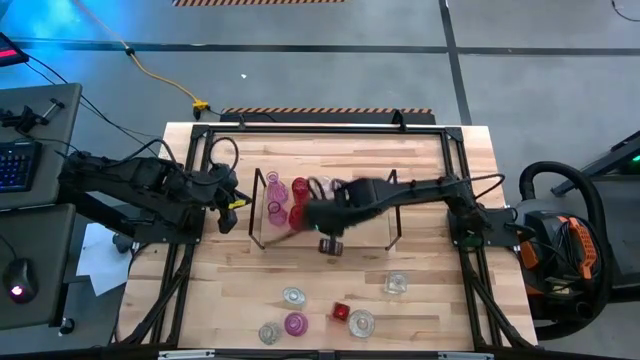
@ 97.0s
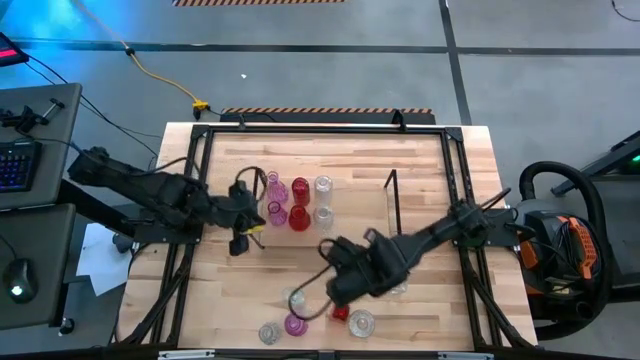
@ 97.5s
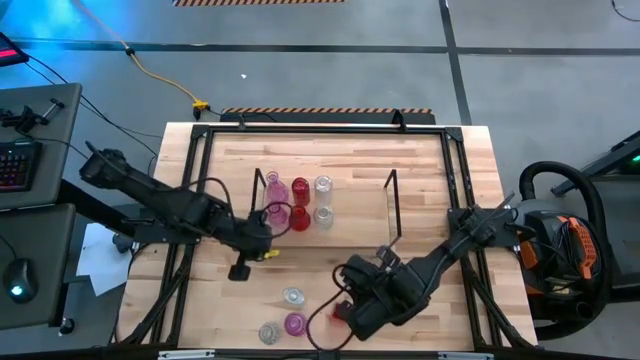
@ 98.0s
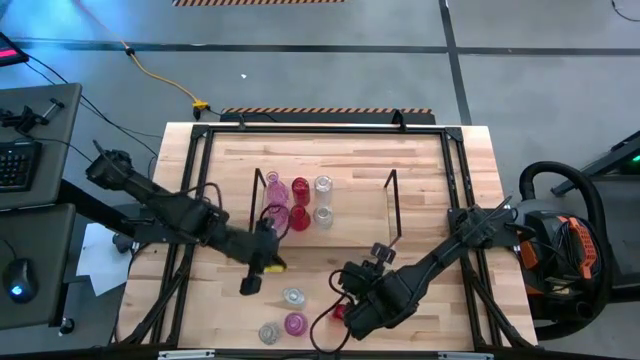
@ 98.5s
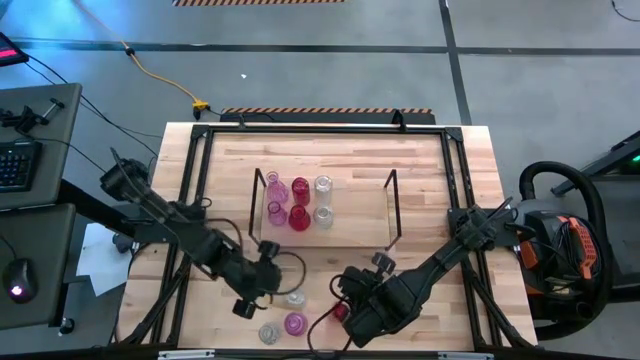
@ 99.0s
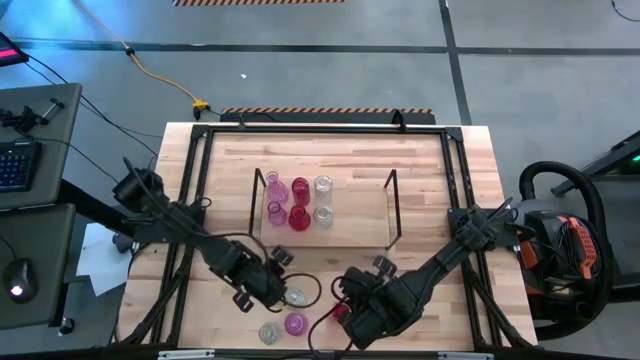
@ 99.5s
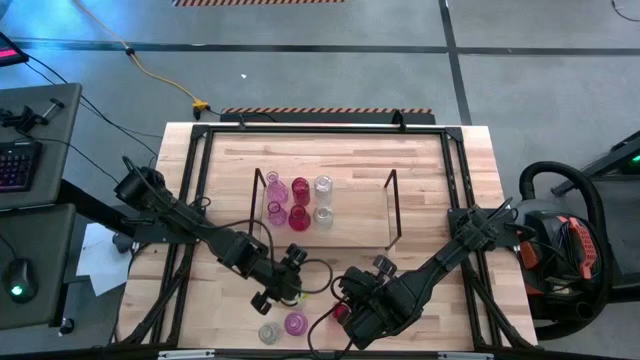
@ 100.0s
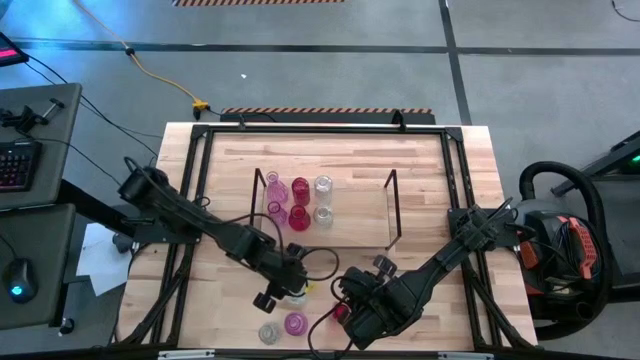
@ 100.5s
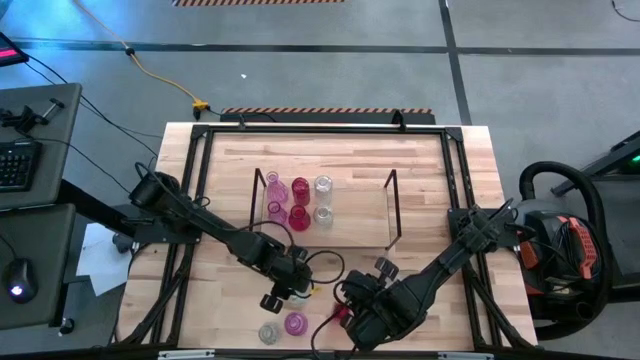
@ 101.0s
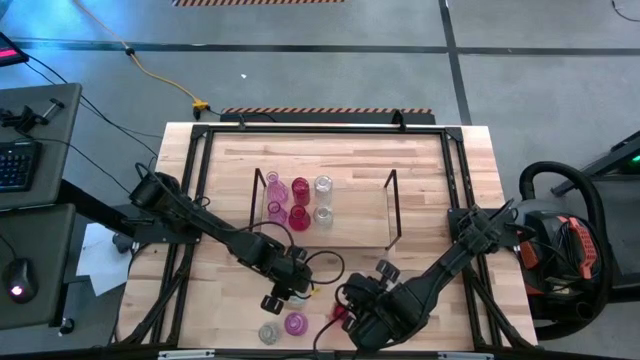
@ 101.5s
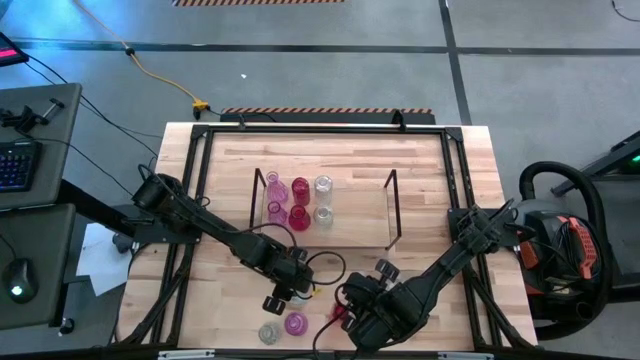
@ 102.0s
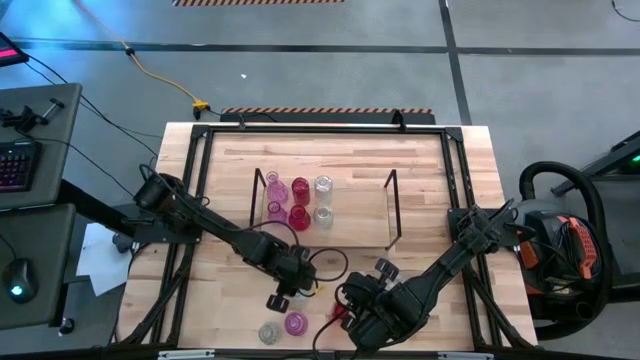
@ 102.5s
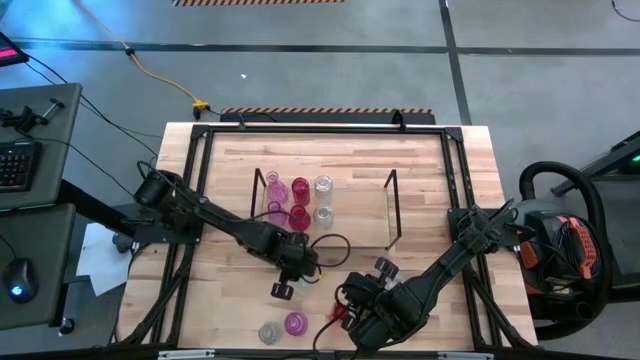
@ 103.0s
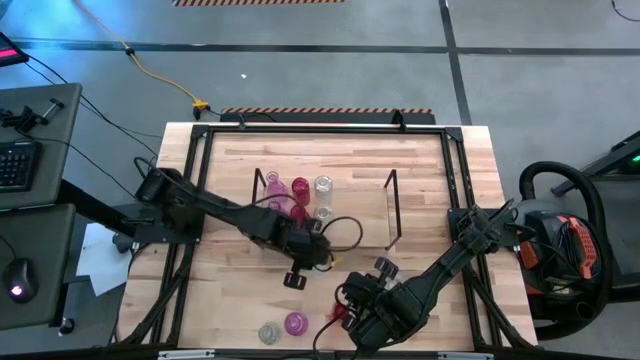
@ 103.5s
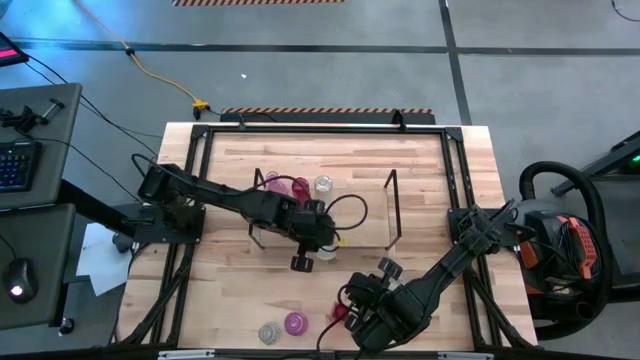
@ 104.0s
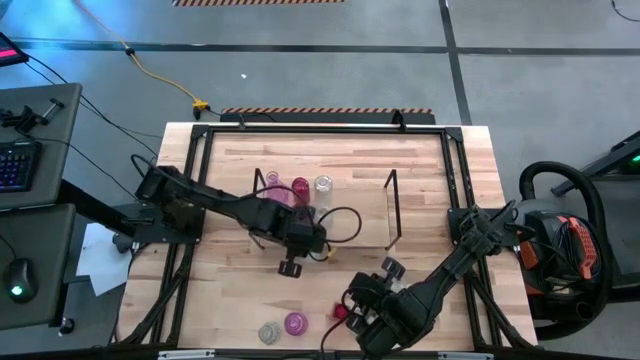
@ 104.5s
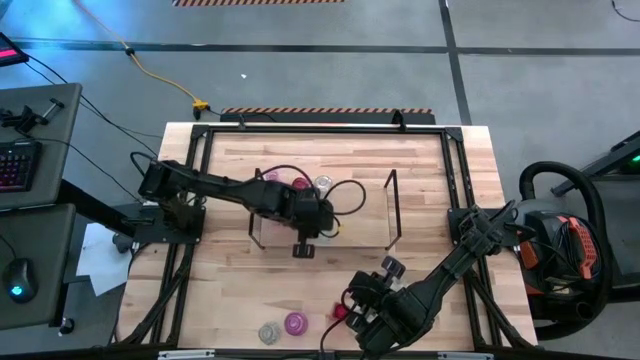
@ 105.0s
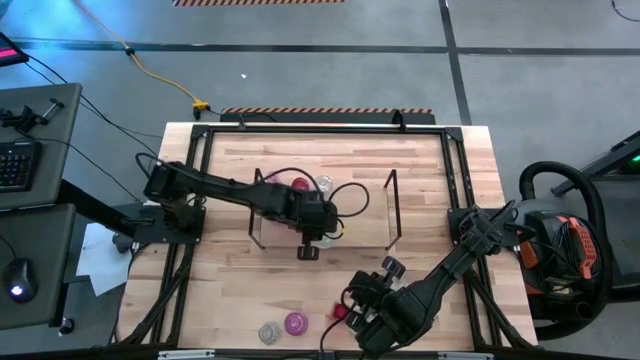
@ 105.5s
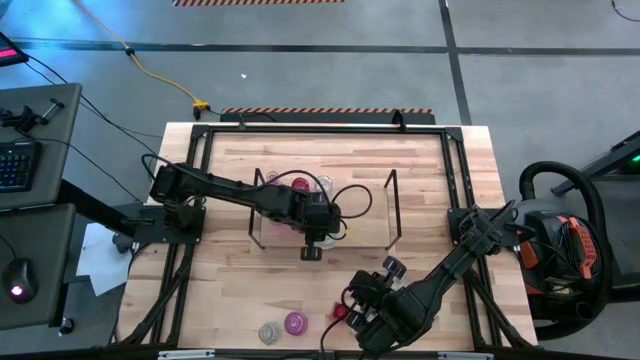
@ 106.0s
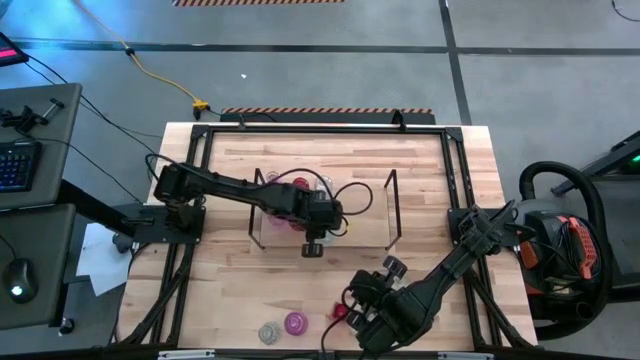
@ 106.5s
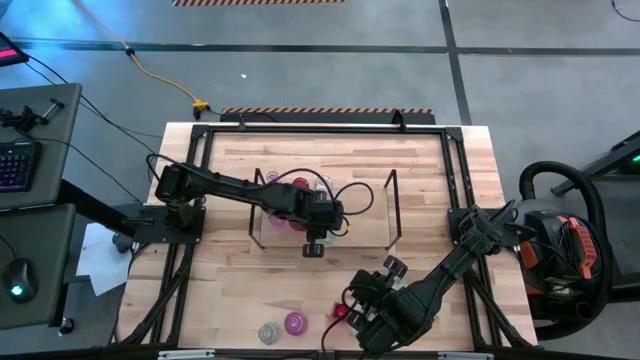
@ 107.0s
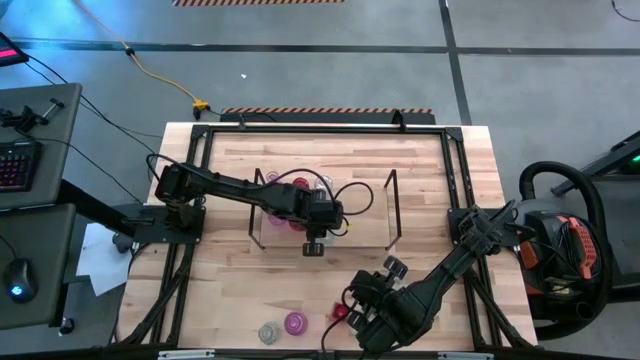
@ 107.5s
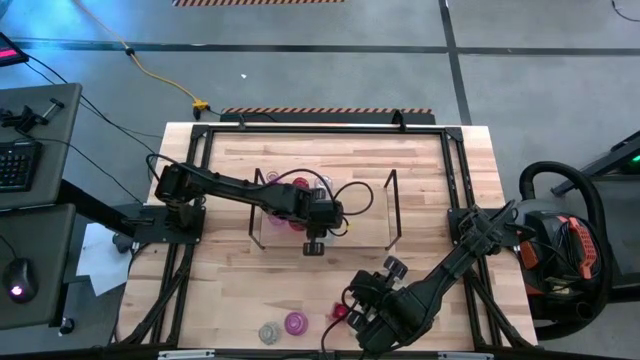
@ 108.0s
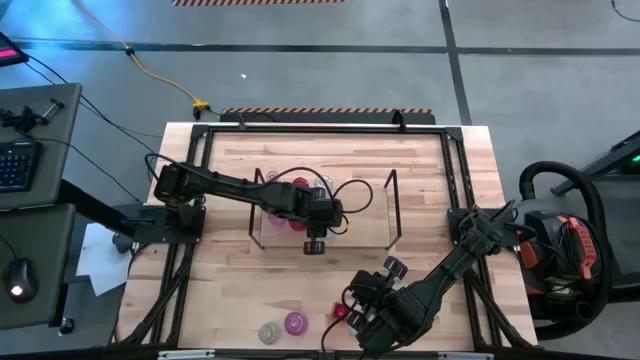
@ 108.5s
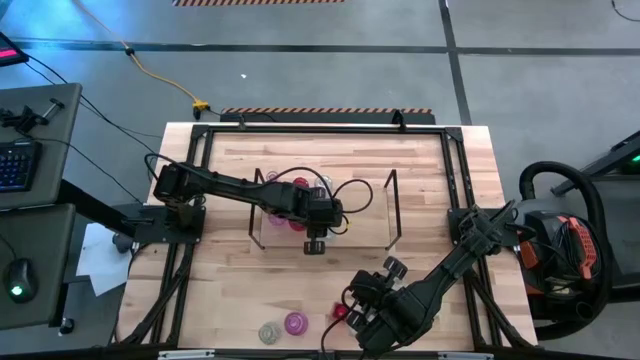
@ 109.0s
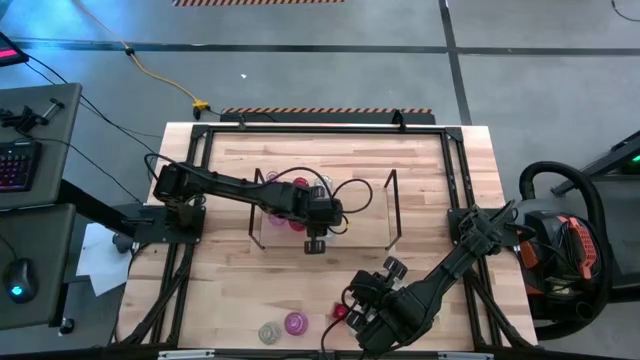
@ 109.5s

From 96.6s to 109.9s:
Task: sort vases onto shelf
Put the transparent vase aligned with the other transparent vases on the shelf

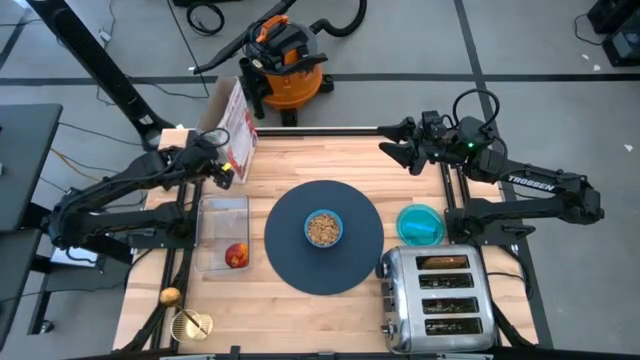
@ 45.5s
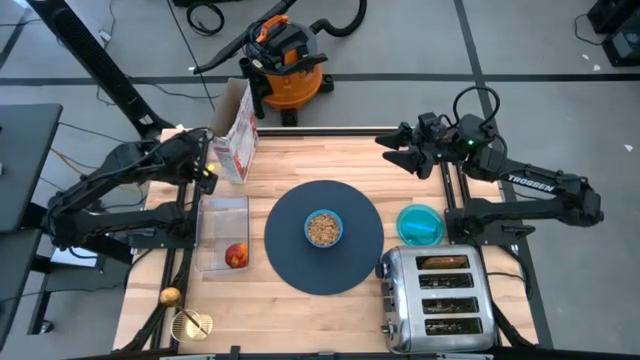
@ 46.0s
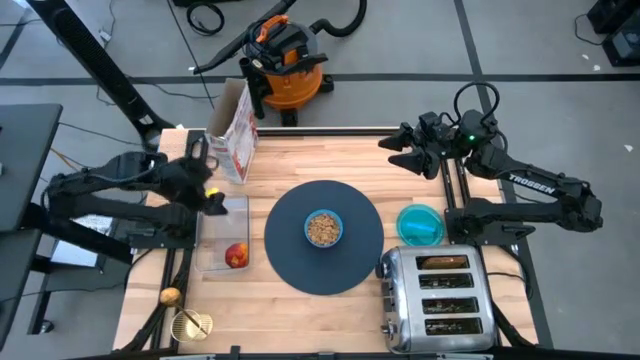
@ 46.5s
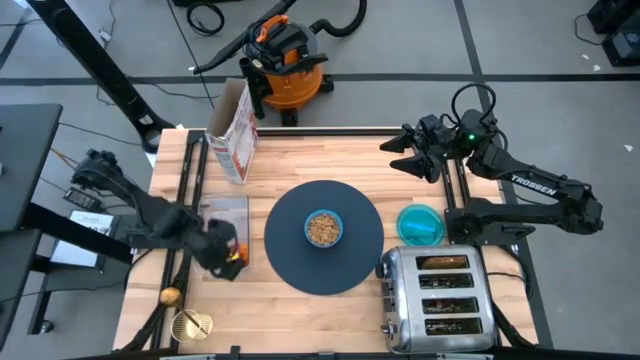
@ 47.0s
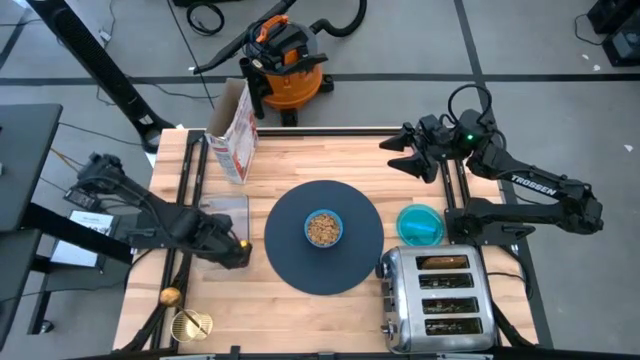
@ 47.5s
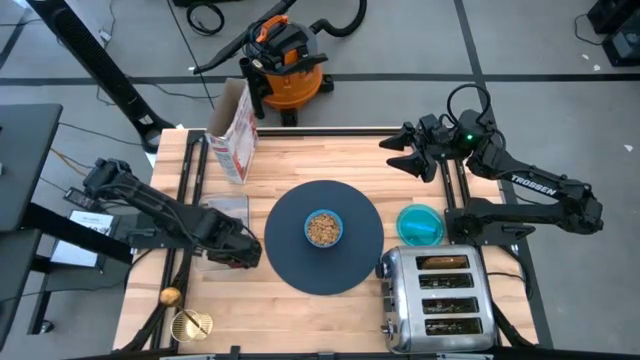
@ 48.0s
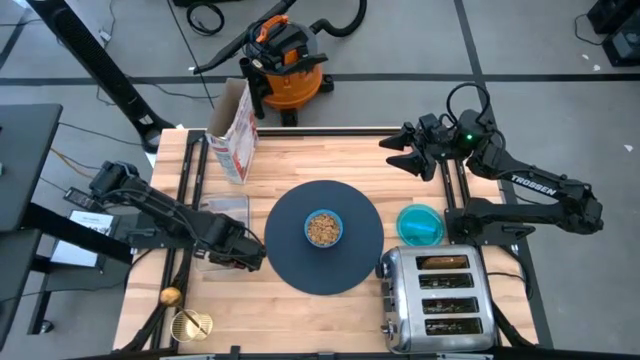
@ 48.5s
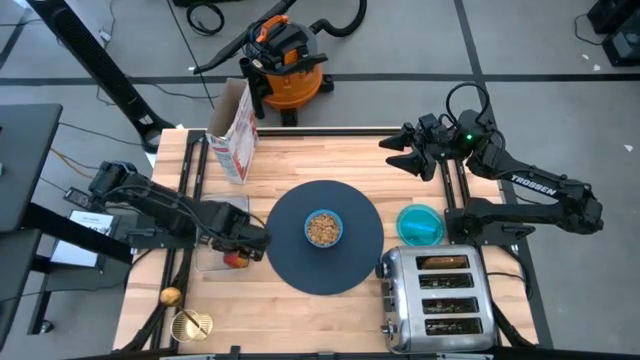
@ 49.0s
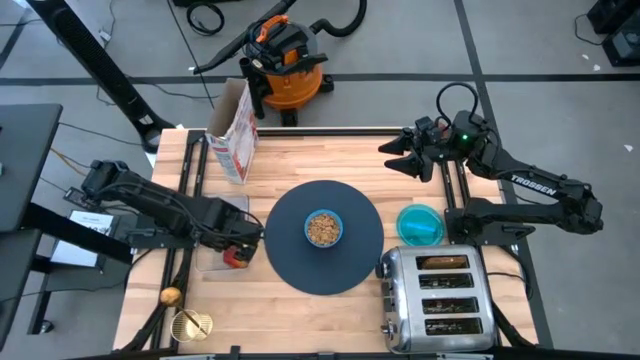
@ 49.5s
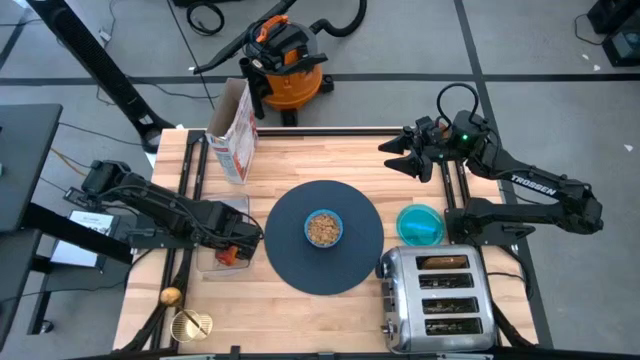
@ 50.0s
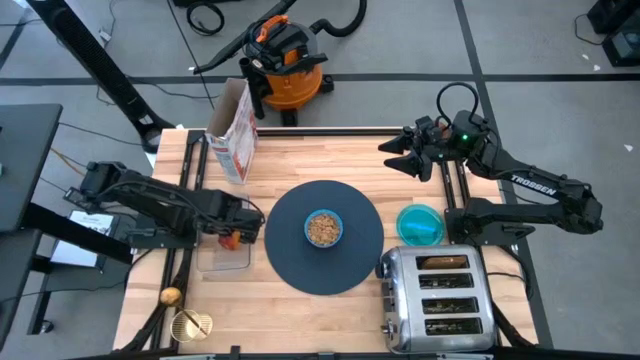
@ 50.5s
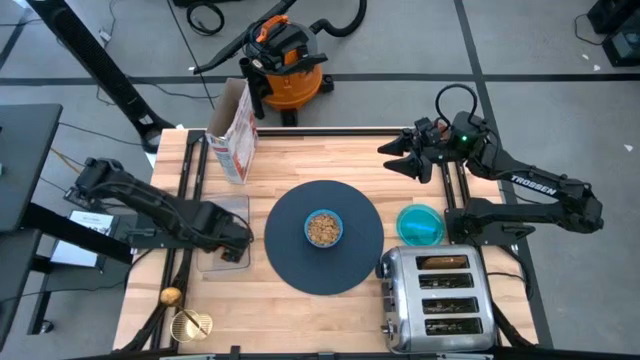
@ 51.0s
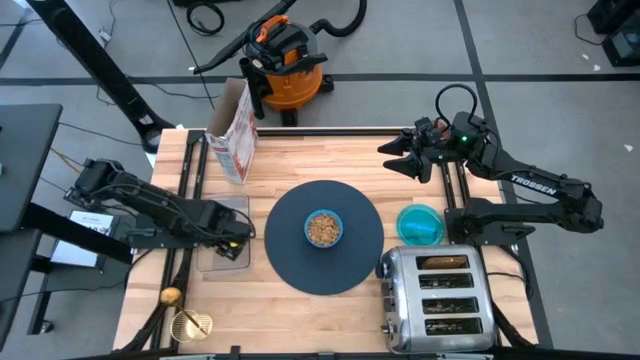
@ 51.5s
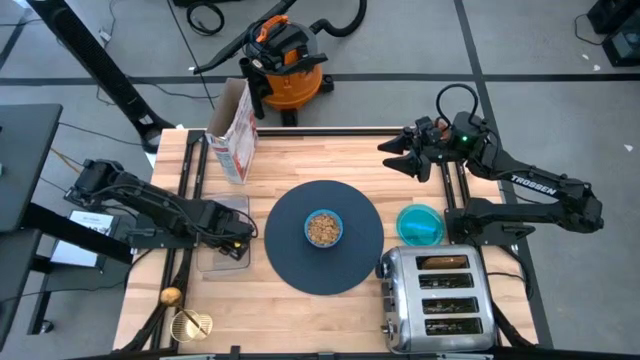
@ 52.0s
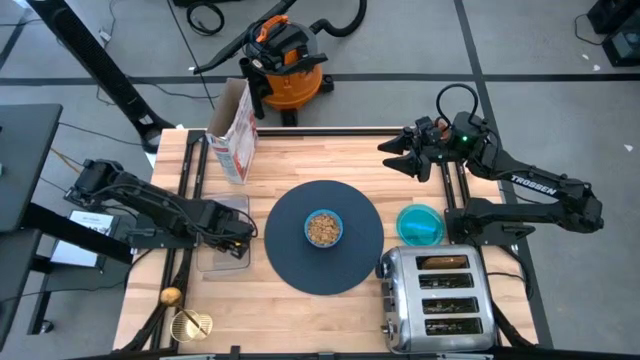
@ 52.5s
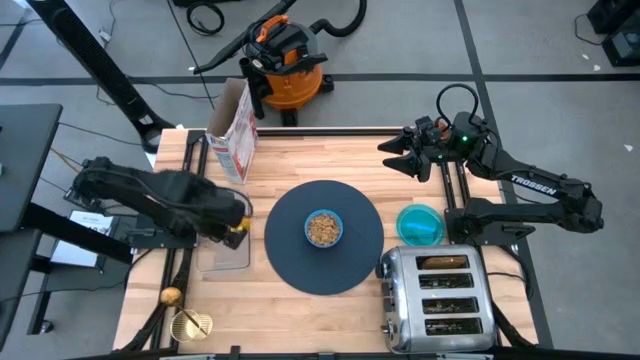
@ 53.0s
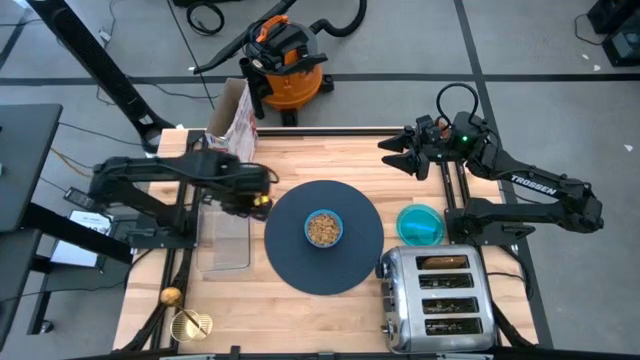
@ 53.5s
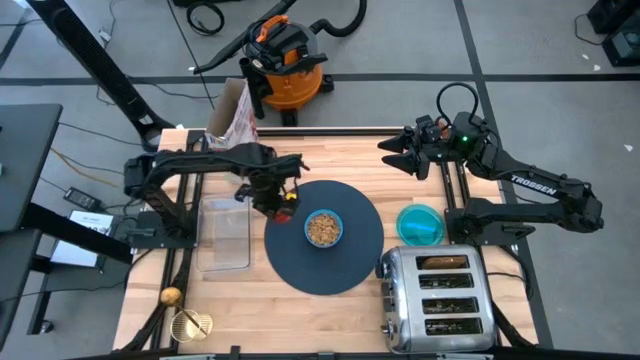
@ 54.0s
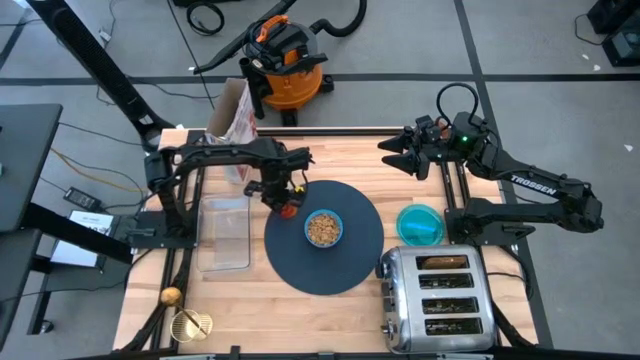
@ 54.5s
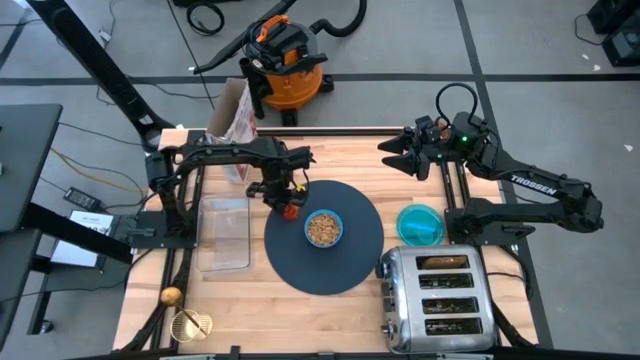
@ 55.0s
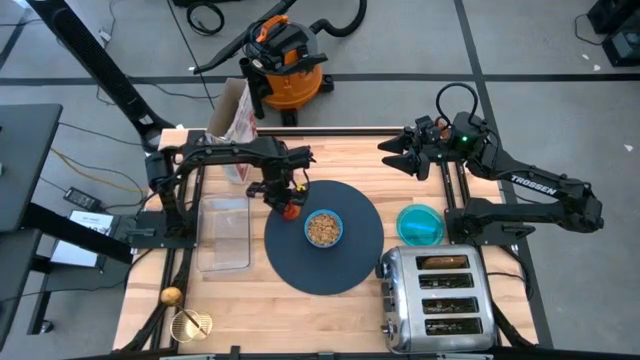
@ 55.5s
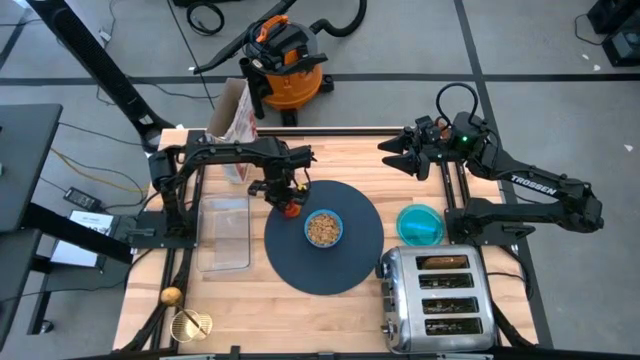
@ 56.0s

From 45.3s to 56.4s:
Task: Arrange a breakfast setting
Put the apple on the blue tablemat to the top left of the blue bowl
